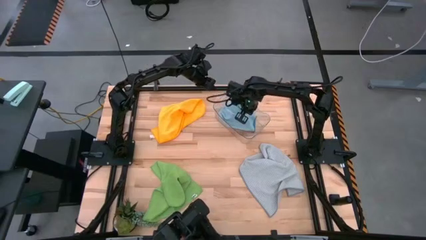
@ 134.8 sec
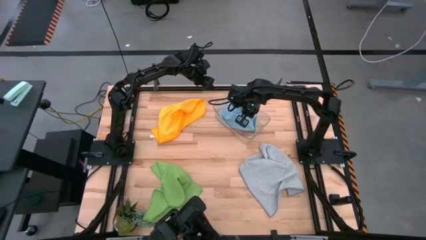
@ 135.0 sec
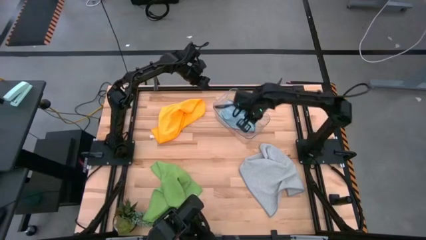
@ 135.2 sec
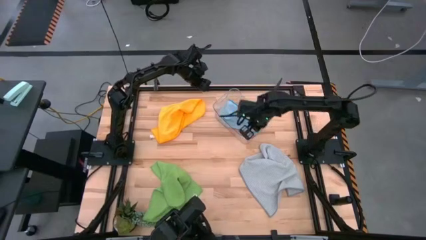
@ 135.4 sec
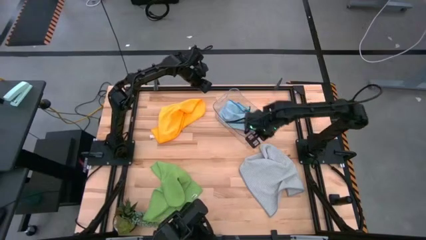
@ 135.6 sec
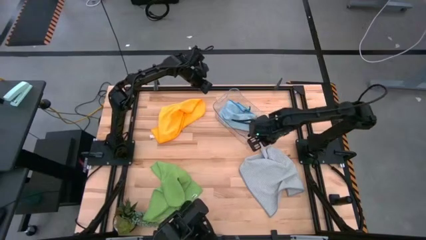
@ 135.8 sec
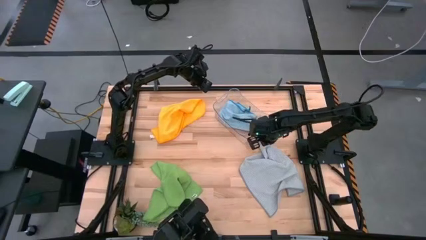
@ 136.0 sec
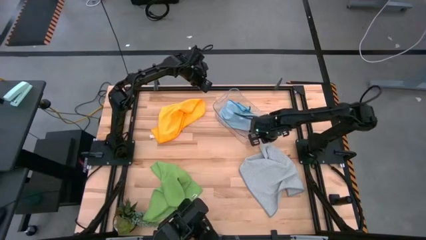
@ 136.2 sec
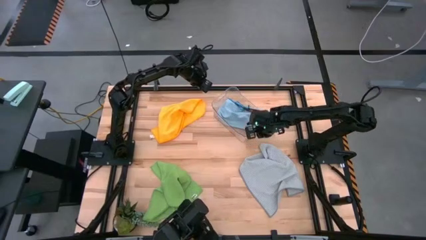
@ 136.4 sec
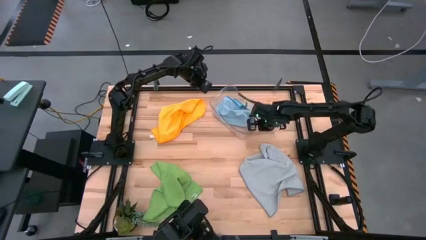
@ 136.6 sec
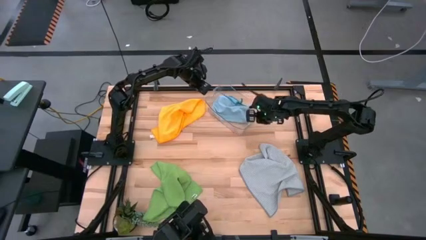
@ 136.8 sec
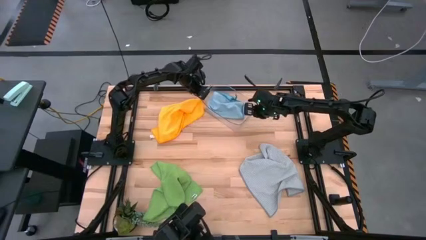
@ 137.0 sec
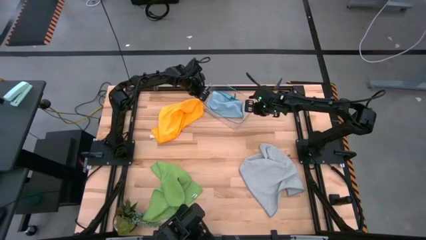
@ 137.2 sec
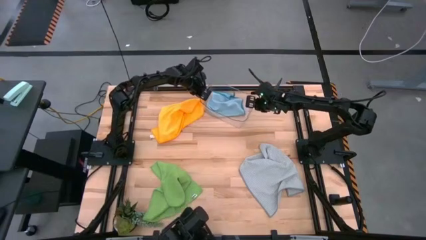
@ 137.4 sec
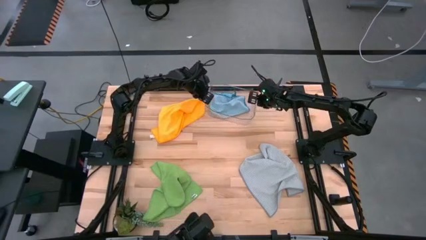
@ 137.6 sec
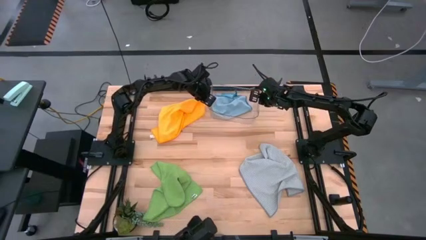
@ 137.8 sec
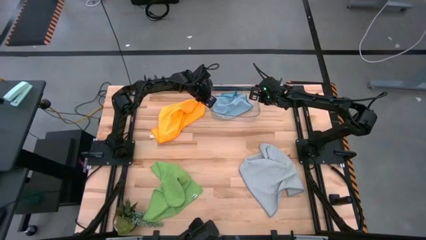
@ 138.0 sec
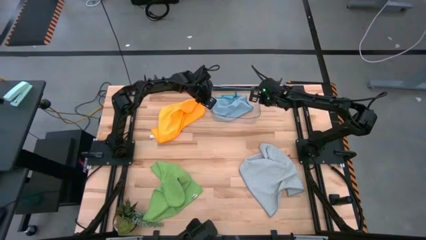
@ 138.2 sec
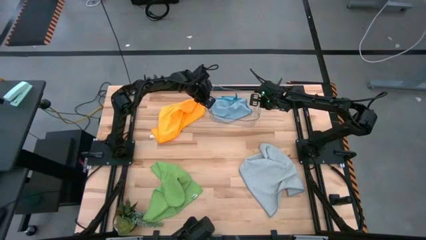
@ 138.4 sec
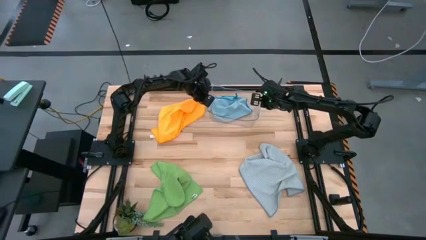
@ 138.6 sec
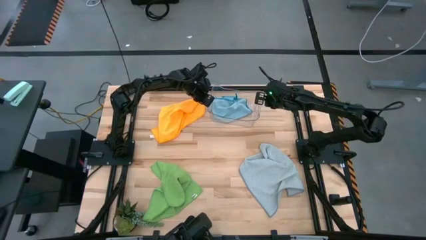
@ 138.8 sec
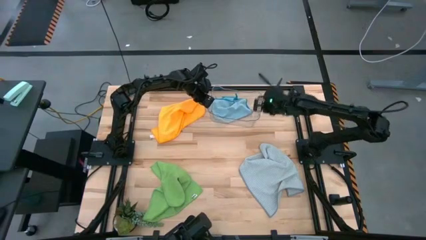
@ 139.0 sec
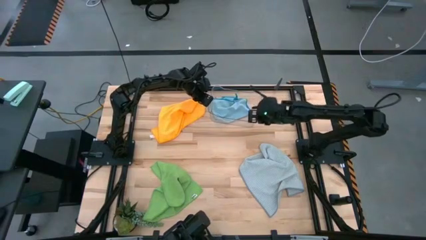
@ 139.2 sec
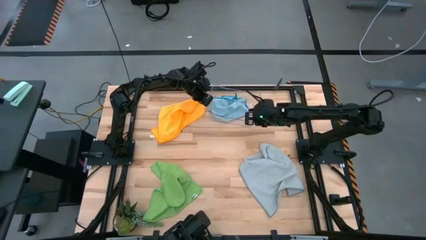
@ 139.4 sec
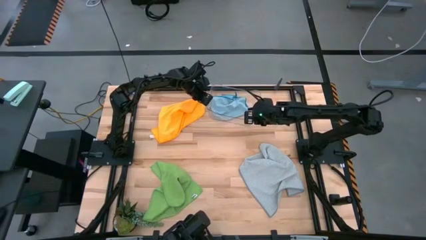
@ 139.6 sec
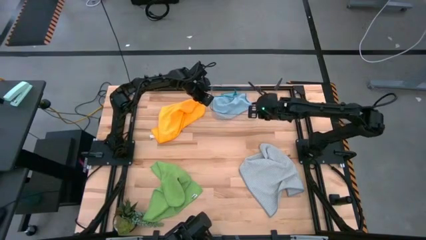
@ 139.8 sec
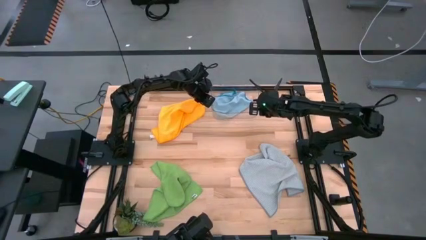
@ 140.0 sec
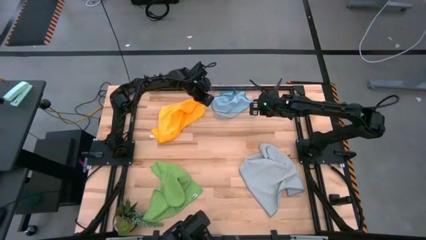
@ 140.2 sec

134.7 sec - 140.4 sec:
Task: Fold microfiber towels
Adjust the transparent bin

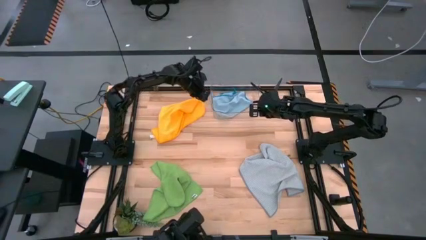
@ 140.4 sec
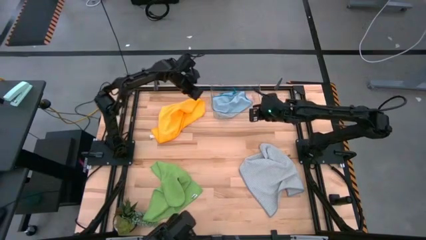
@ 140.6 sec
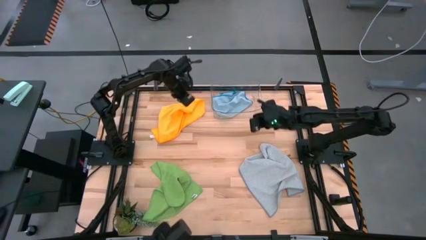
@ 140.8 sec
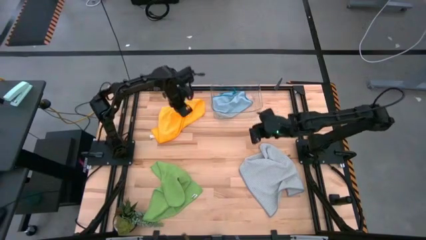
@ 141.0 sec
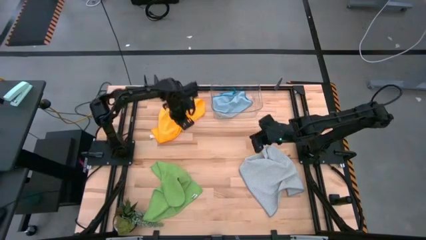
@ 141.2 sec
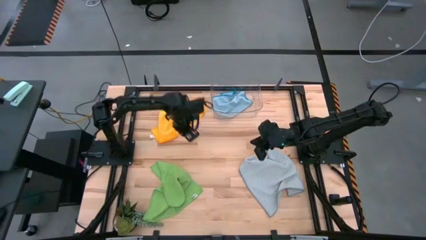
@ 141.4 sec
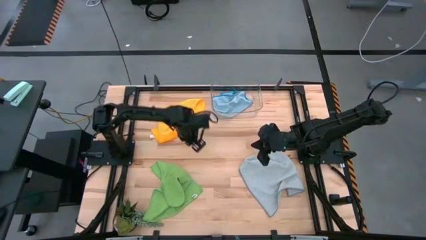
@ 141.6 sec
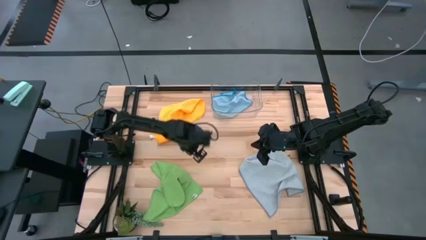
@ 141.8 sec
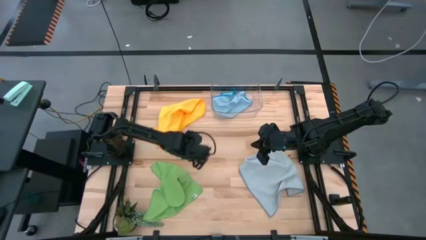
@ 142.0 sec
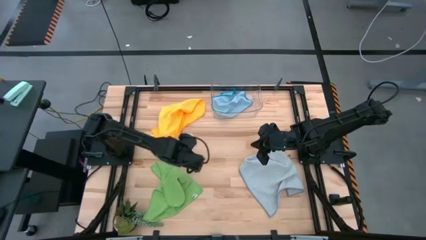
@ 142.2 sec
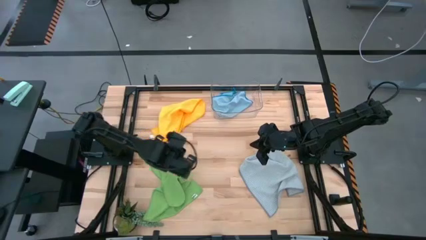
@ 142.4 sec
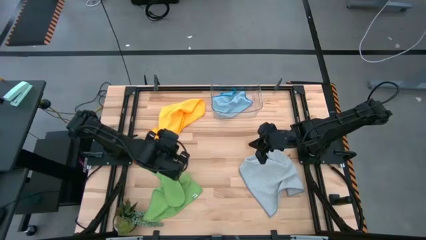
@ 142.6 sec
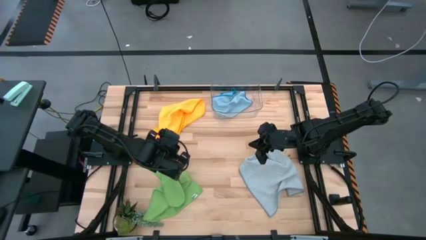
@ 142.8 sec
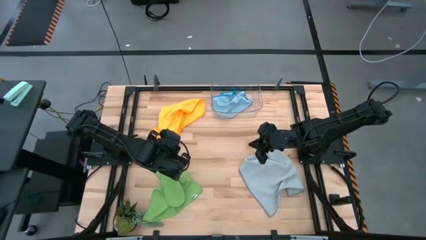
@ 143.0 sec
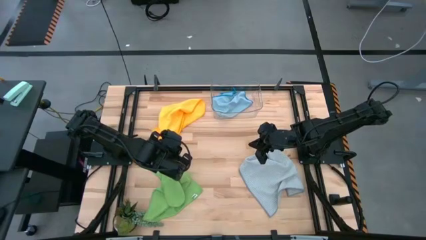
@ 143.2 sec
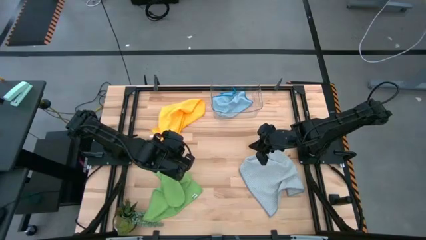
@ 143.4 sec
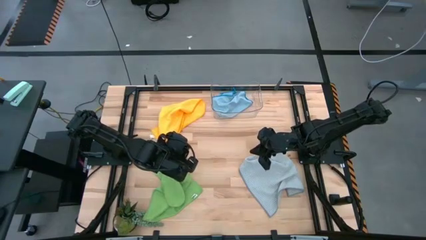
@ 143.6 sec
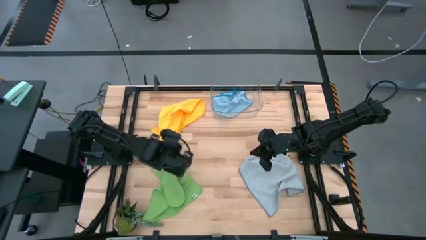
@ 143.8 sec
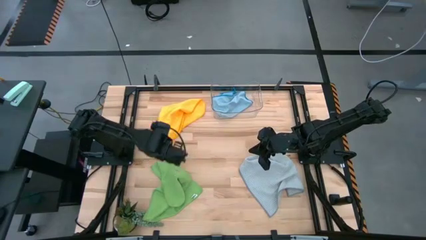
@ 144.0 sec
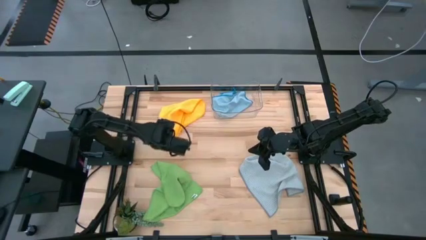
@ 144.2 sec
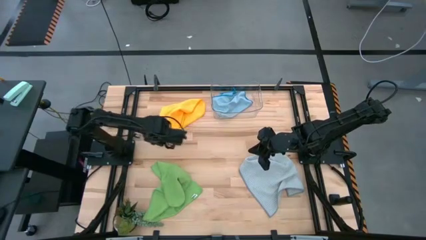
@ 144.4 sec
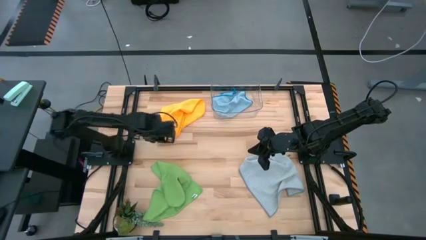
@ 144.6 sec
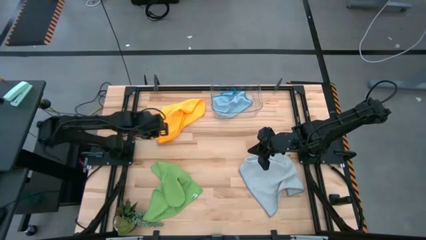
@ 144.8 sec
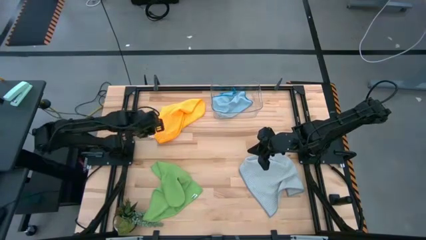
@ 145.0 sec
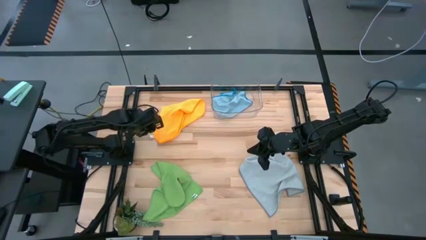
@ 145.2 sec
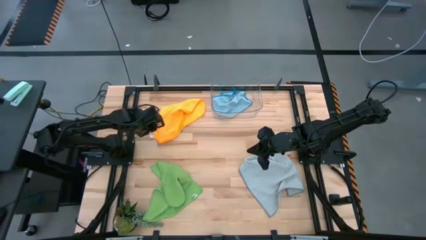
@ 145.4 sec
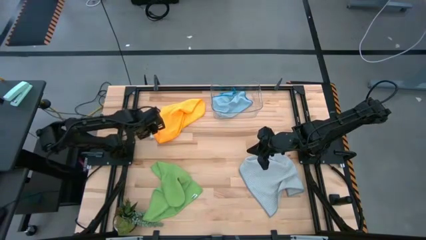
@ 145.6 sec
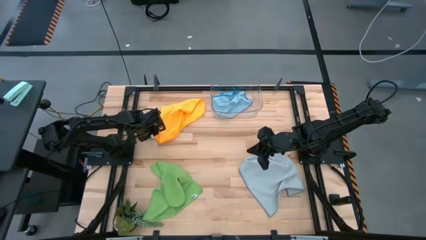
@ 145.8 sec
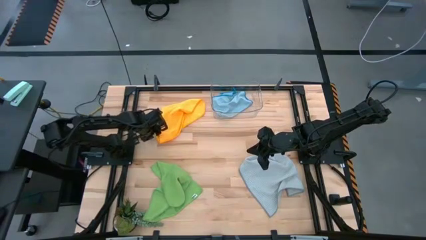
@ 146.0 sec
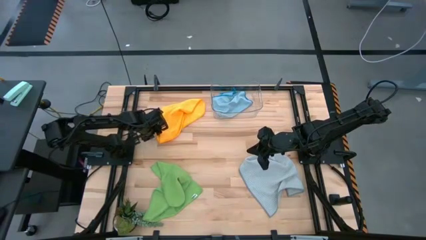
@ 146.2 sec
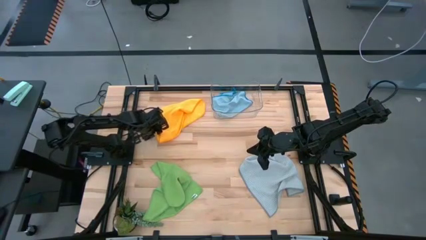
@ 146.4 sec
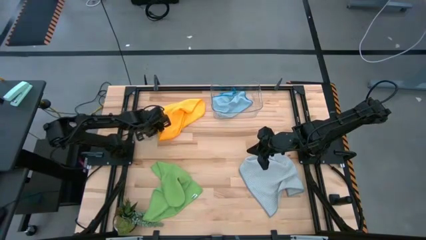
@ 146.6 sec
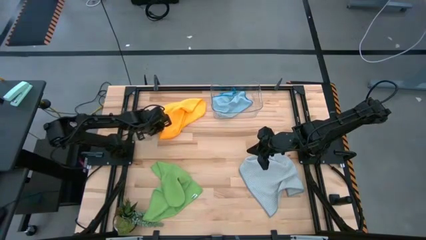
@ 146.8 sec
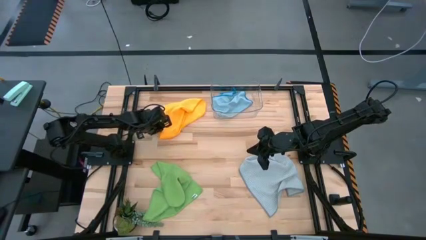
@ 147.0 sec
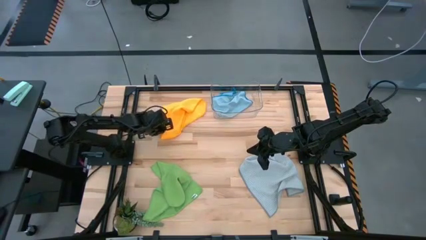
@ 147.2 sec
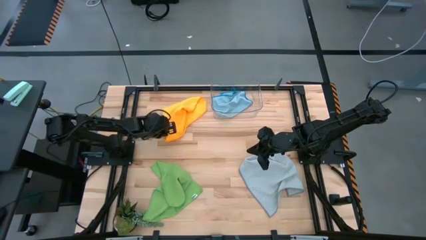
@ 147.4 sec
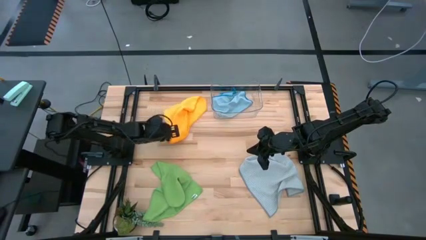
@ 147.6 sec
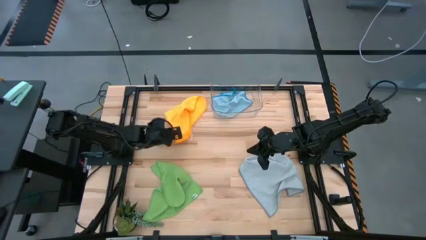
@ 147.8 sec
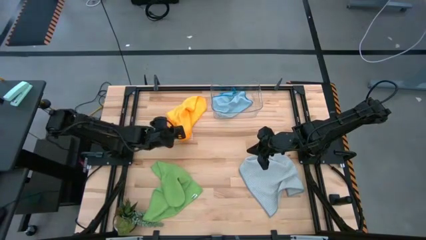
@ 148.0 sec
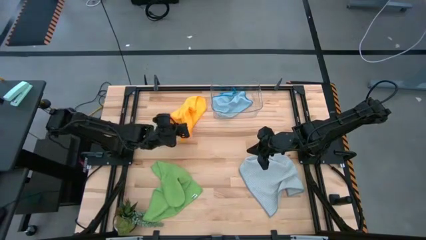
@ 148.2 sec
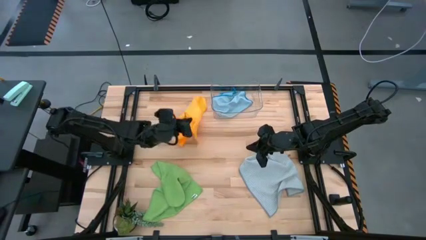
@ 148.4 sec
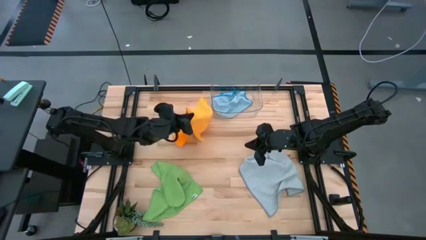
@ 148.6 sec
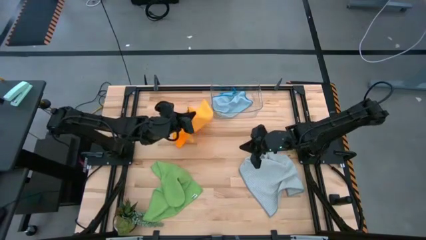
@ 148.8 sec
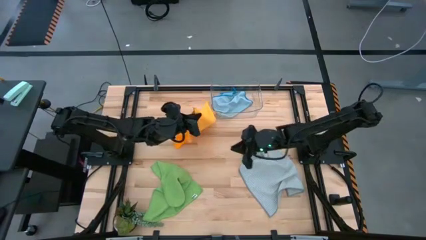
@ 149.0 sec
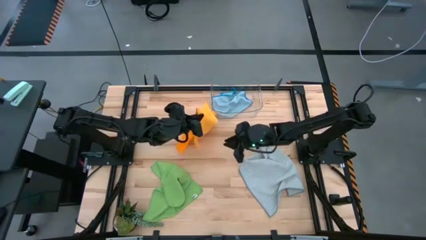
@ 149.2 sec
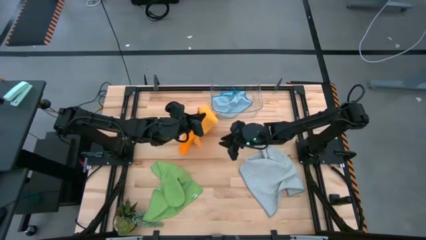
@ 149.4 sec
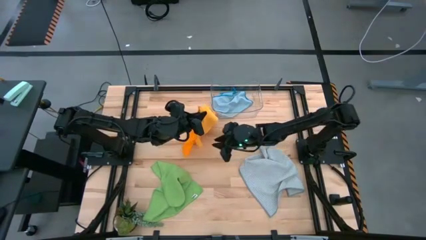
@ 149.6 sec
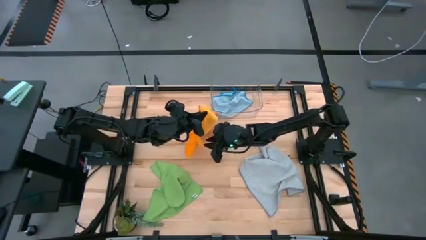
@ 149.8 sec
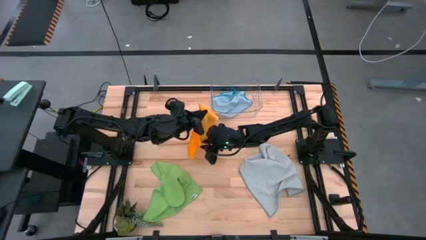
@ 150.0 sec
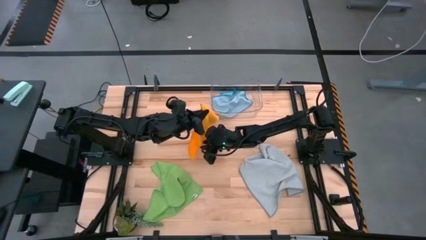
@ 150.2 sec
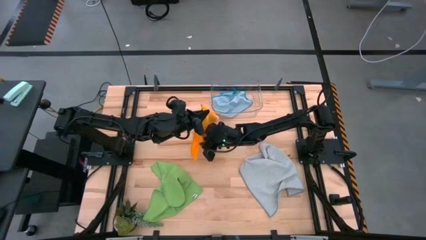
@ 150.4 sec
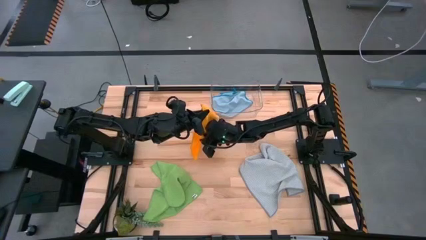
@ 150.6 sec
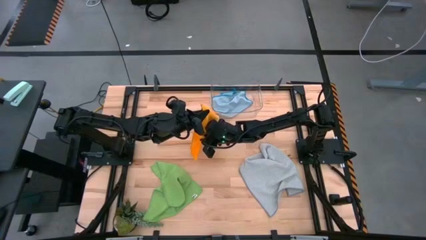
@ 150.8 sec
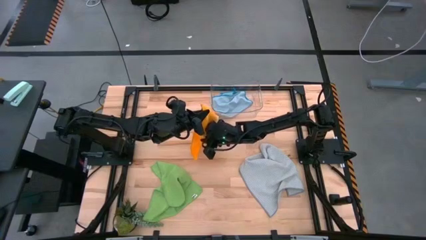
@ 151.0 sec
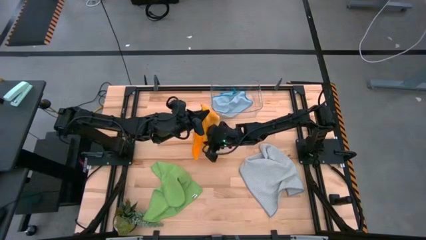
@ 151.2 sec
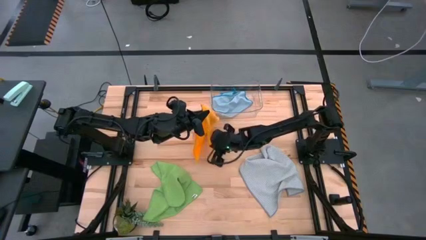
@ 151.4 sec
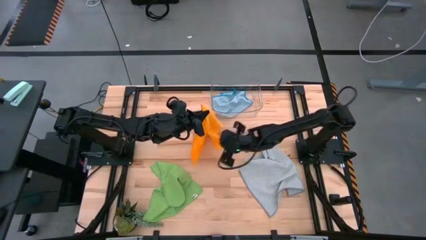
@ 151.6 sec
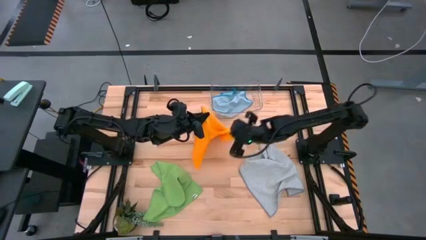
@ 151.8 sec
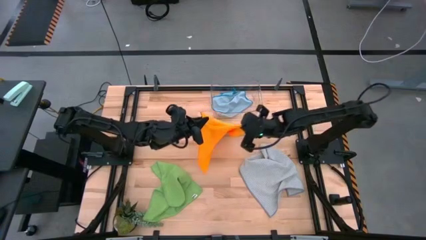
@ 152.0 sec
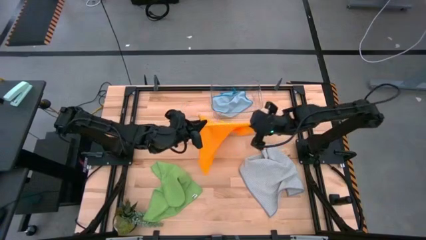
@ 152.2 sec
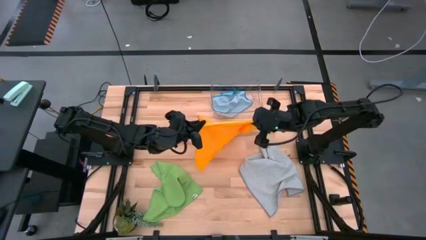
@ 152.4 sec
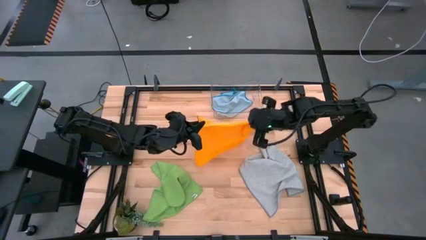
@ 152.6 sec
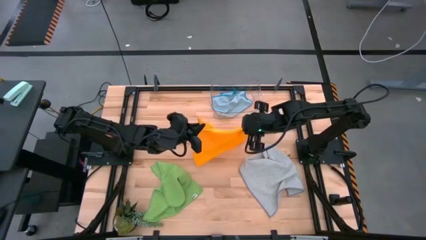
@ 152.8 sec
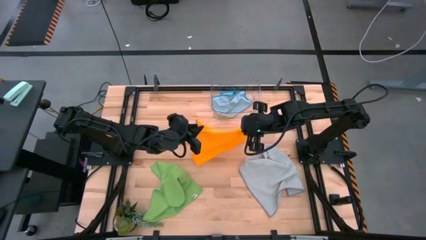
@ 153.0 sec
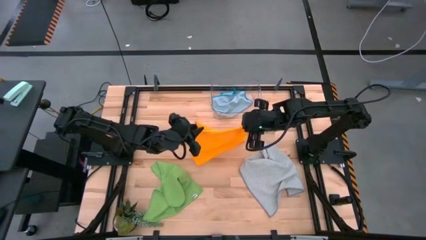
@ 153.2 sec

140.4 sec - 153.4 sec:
Fold the orange microfiber cloth
